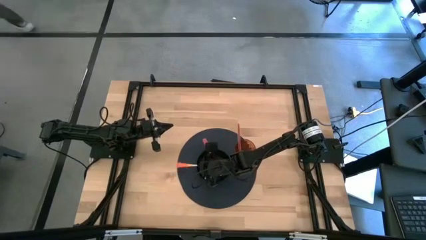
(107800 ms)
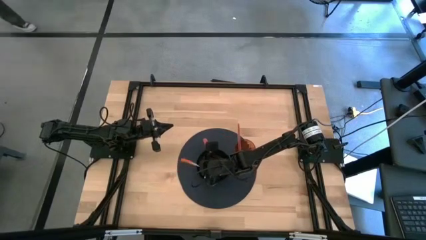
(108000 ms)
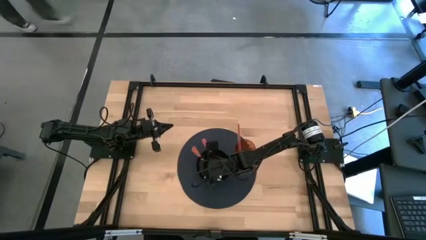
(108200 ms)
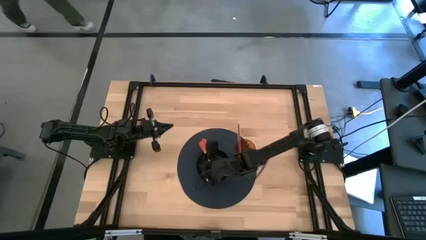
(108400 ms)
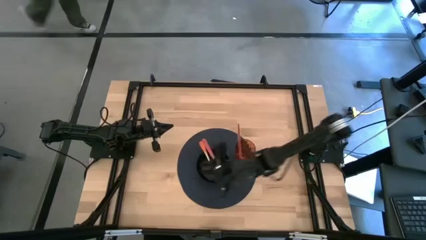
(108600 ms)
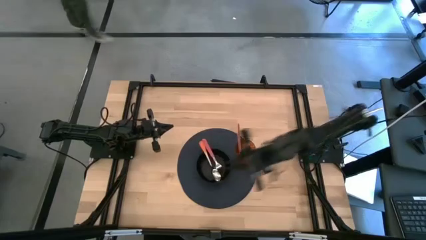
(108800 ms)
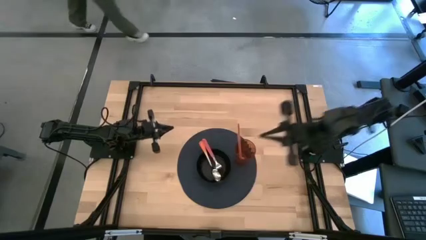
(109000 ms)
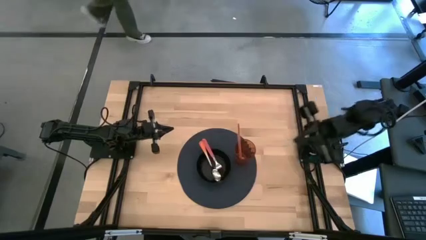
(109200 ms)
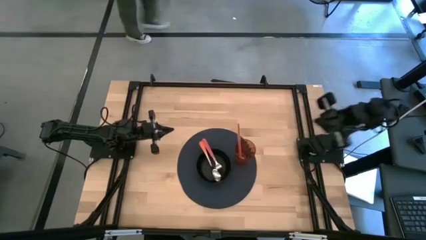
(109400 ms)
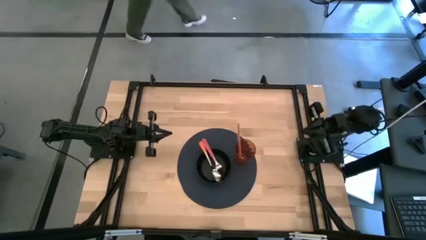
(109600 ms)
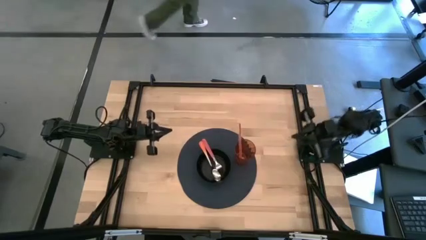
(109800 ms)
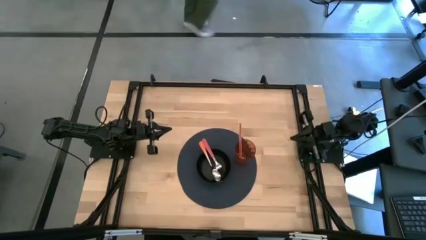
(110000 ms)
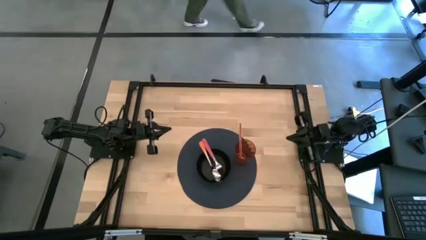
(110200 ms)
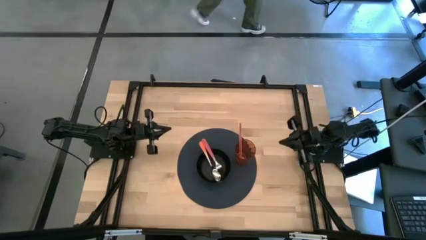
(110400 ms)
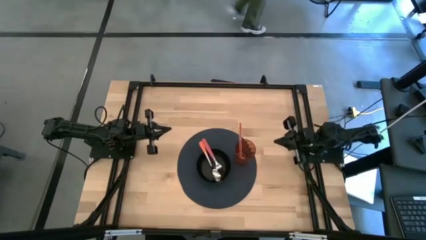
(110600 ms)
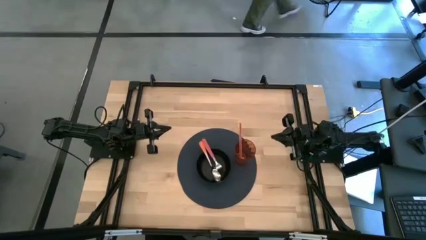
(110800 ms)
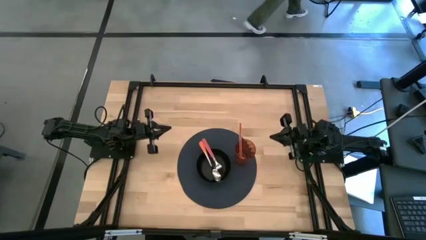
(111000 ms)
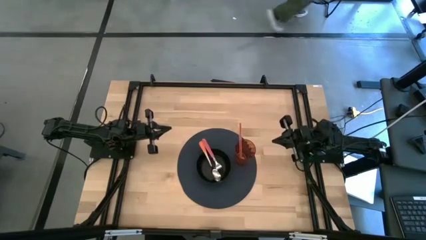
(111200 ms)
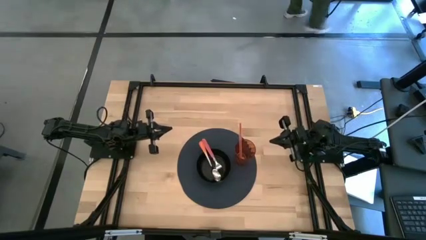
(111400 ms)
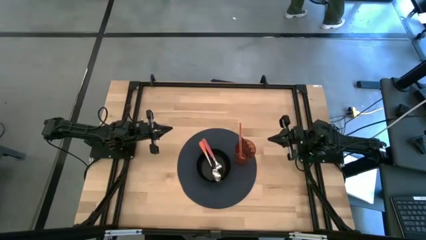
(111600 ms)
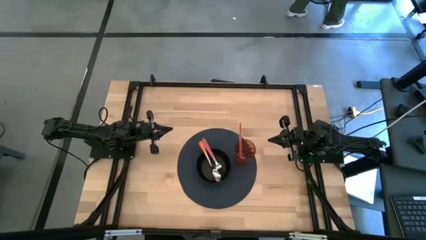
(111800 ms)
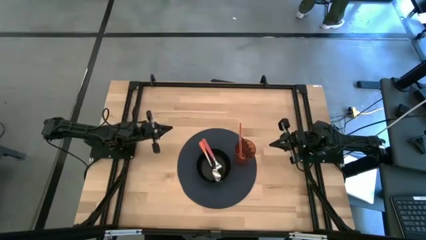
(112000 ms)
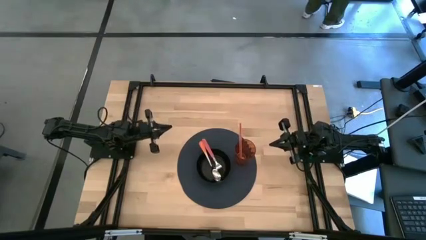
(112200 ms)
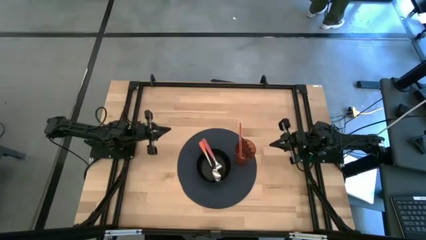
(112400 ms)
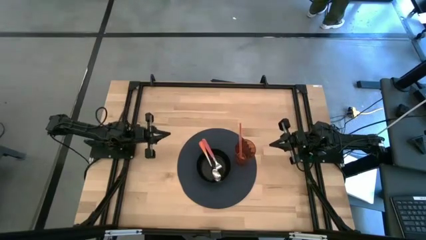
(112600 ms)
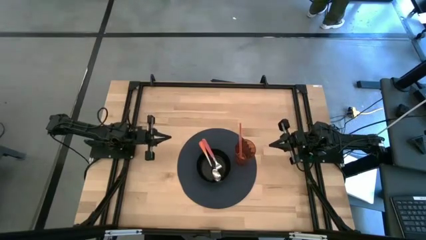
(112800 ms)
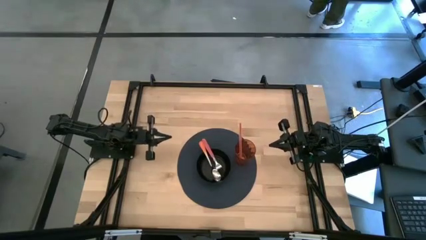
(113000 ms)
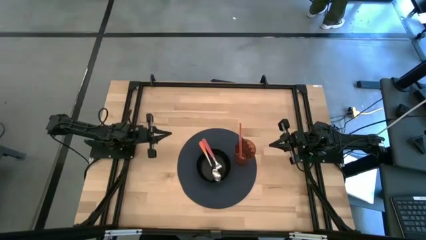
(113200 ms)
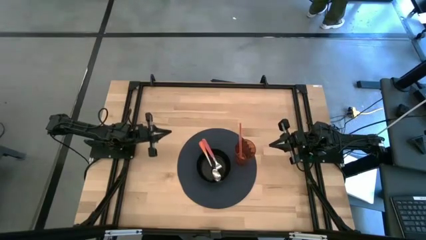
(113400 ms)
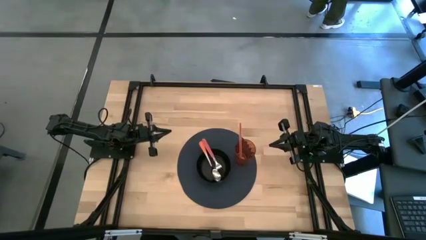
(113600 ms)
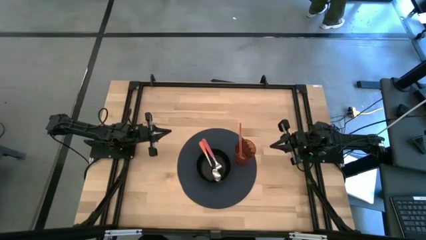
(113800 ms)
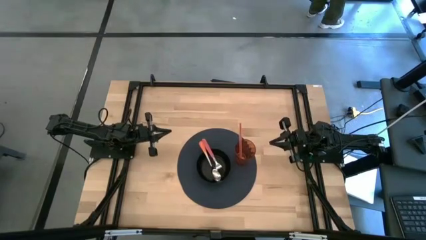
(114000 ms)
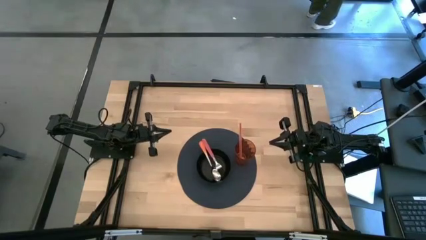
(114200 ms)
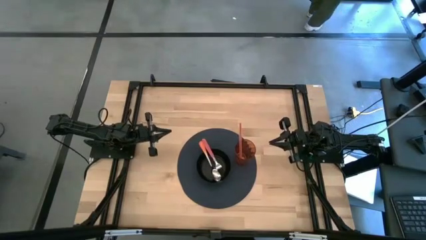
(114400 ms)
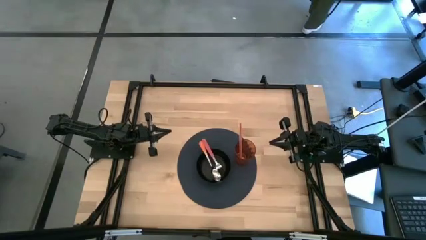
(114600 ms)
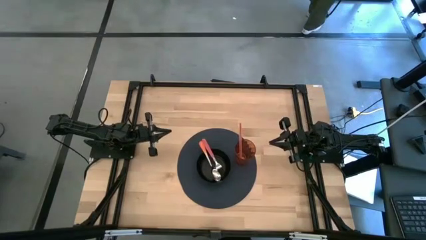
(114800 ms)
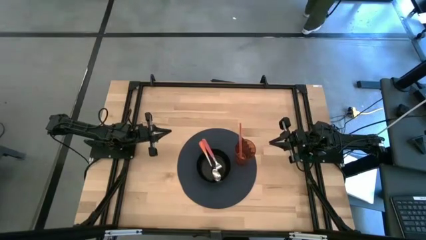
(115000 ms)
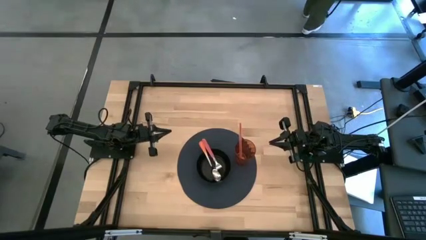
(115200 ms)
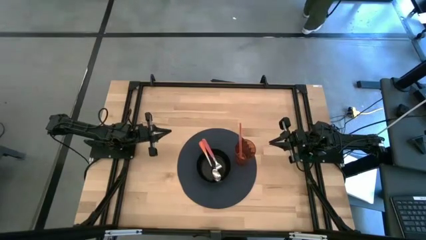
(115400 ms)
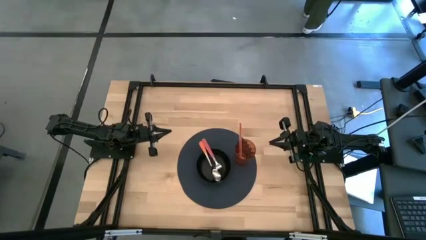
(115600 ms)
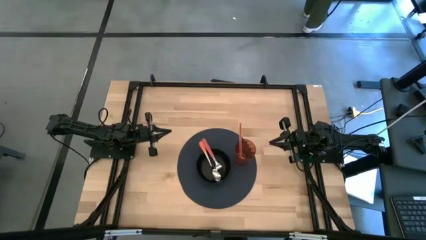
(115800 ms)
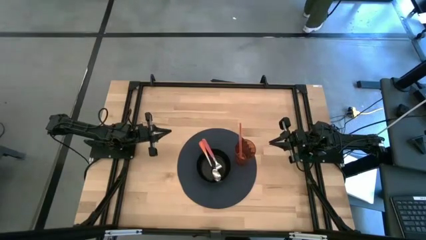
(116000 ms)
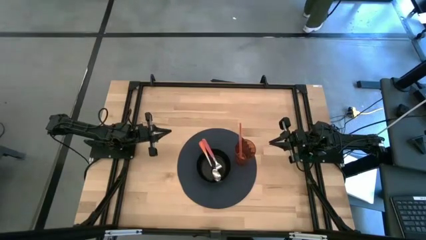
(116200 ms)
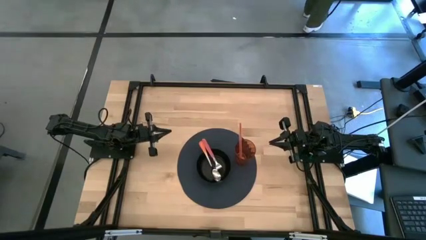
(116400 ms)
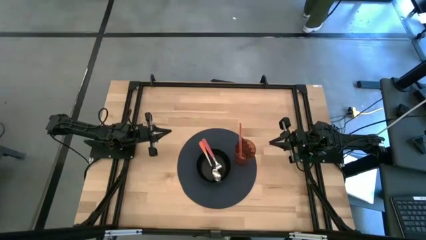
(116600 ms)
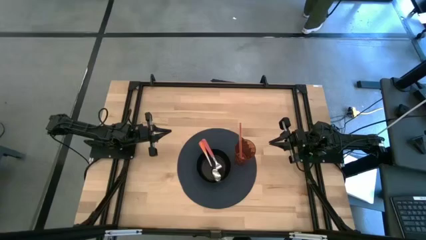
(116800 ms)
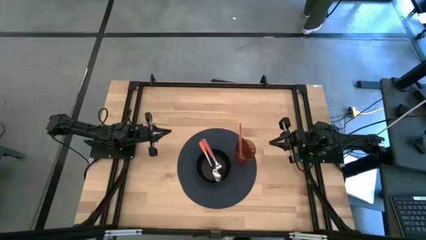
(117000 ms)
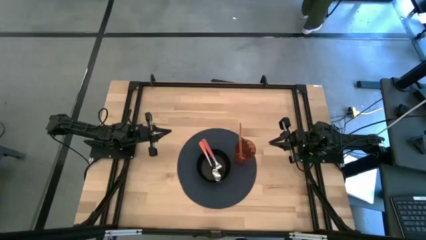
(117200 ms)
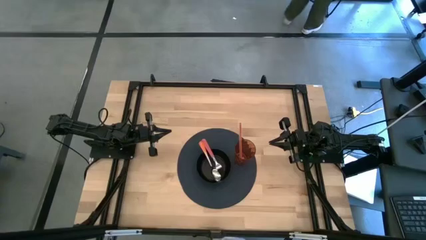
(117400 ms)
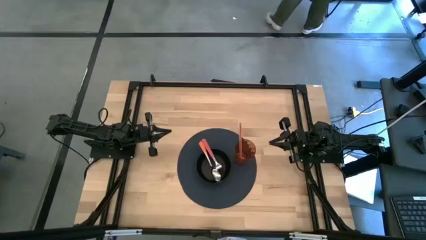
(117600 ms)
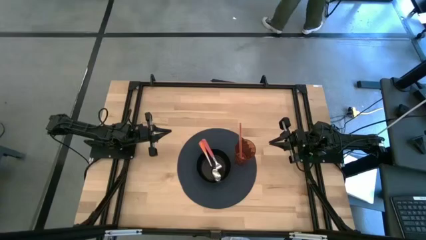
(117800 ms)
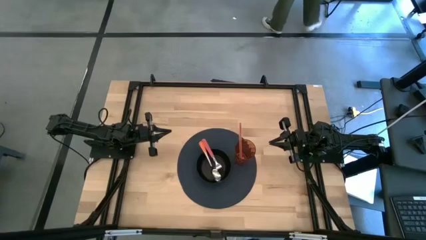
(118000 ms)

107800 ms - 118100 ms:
Task: Pick & Place Utensil
Return to Home Position

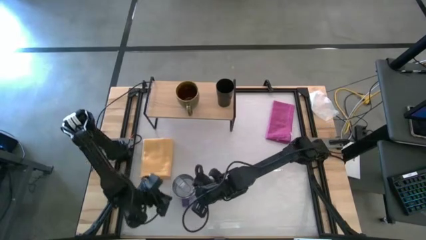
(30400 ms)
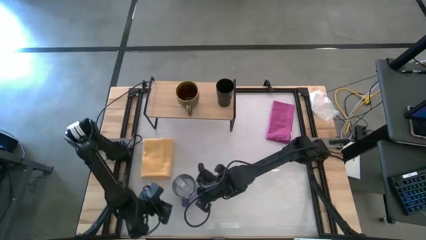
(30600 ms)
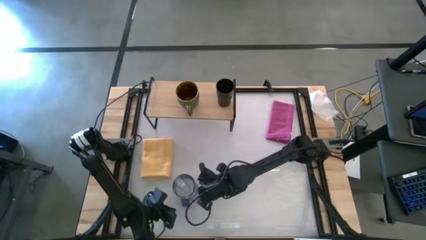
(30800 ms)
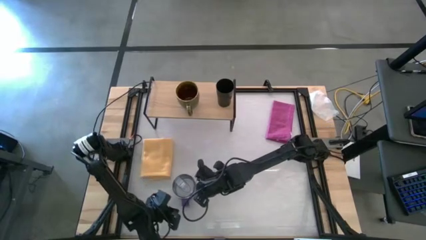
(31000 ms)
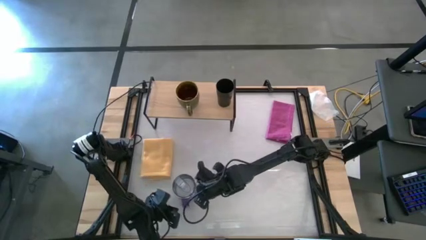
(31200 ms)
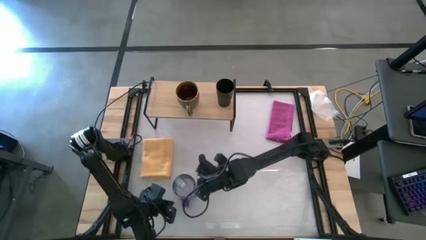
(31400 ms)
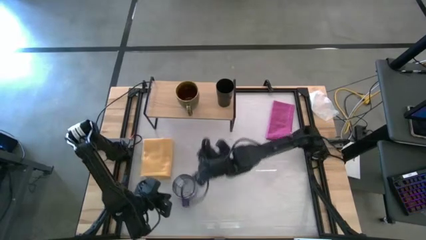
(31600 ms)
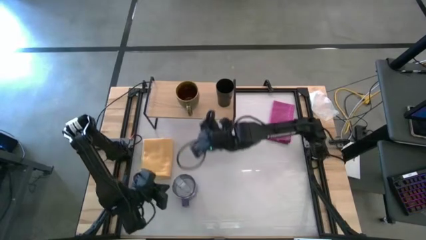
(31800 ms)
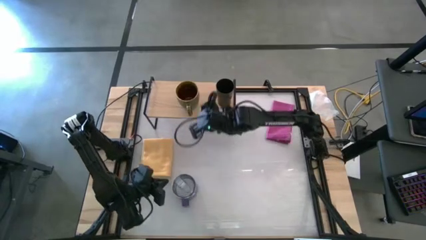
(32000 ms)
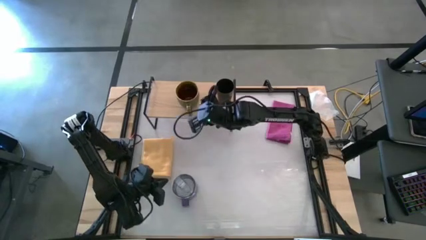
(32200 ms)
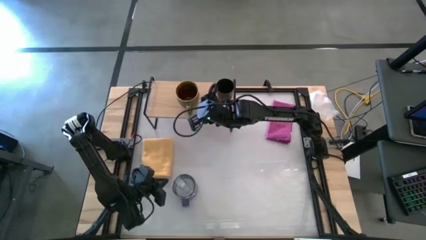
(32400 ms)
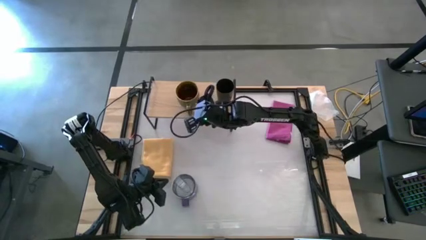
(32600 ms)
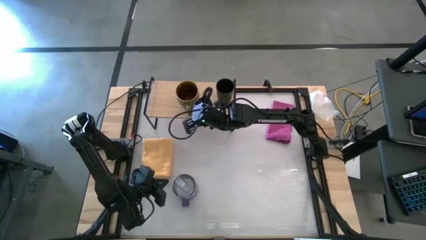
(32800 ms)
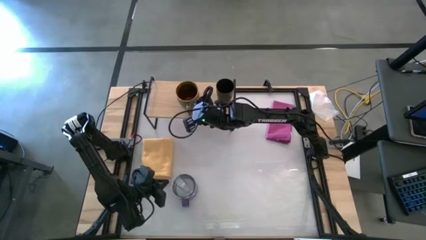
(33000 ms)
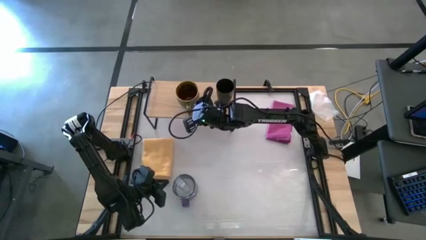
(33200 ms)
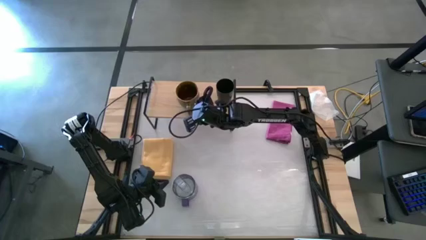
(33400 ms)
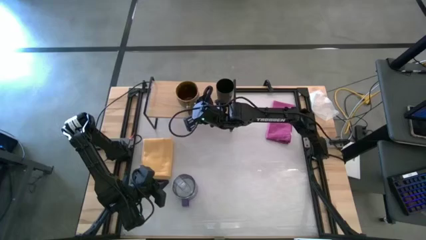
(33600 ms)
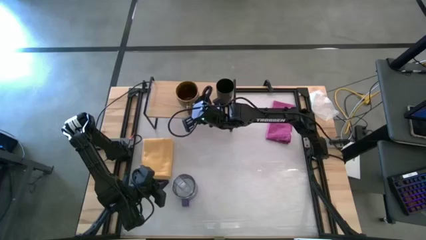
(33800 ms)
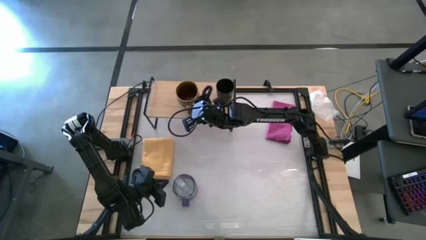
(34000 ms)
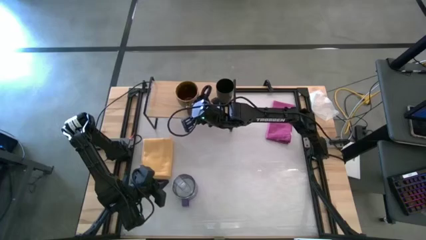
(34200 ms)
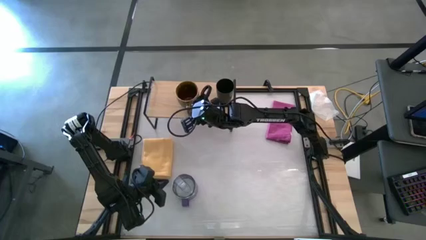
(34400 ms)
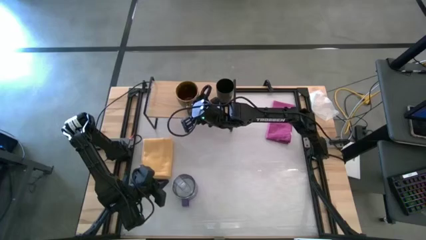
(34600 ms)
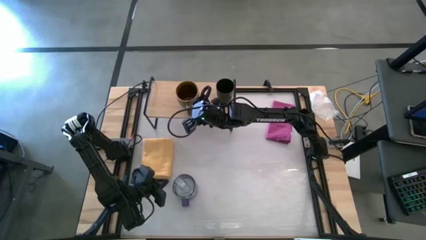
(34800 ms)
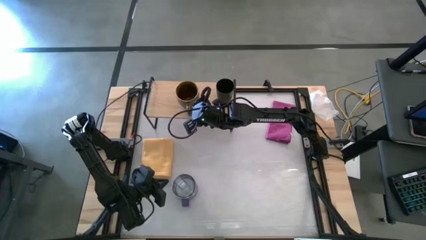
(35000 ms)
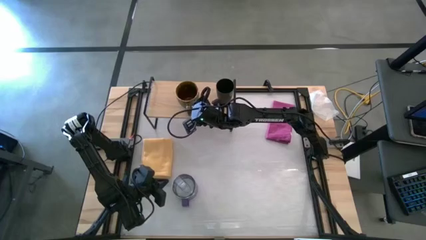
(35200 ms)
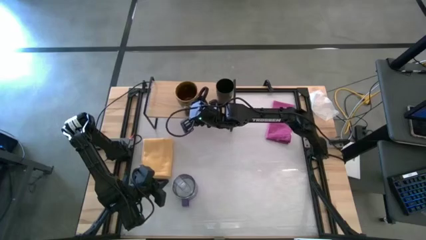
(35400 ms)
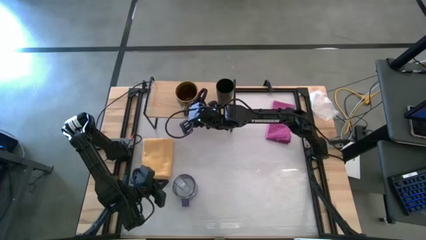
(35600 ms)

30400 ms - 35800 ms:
Task: Stack small to large cups/mugs on shelf
Adjust the green mug on the shelf
